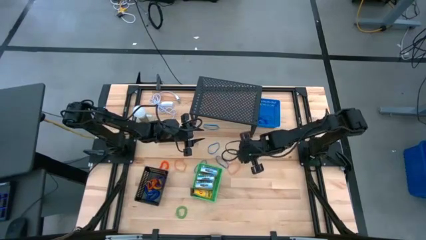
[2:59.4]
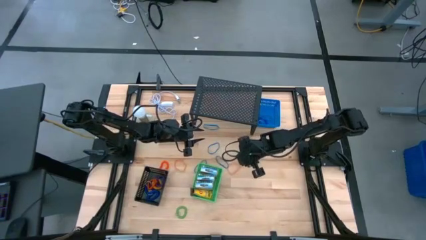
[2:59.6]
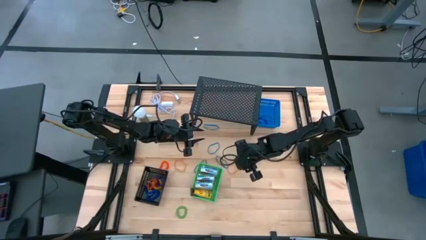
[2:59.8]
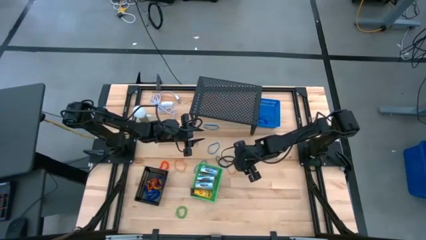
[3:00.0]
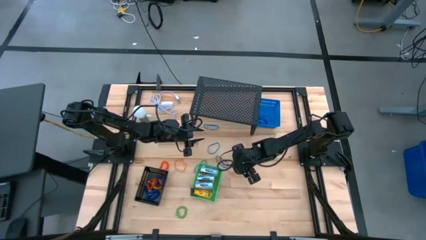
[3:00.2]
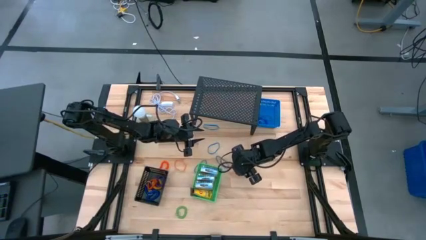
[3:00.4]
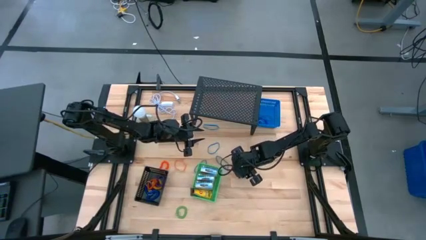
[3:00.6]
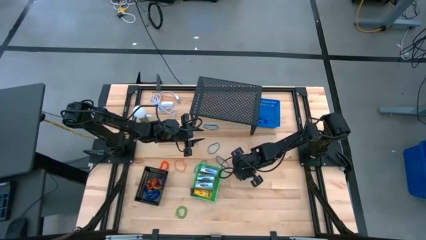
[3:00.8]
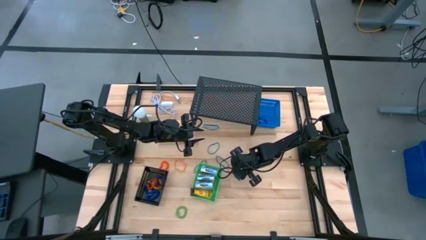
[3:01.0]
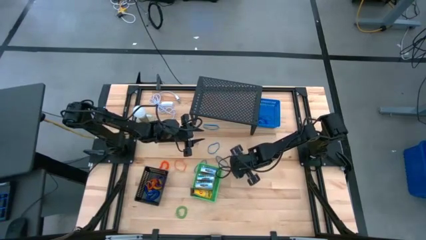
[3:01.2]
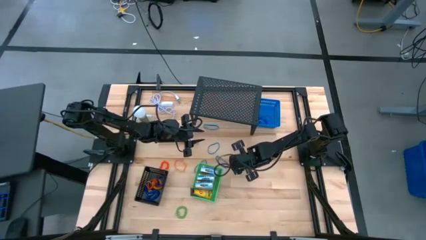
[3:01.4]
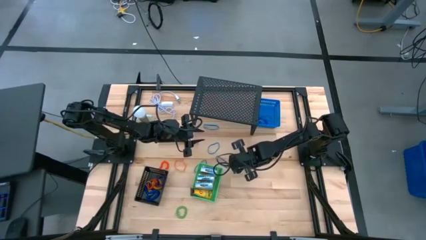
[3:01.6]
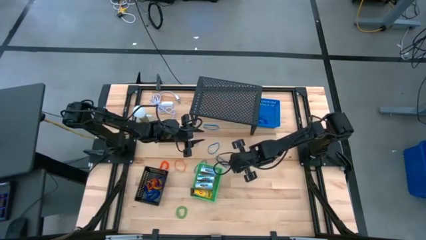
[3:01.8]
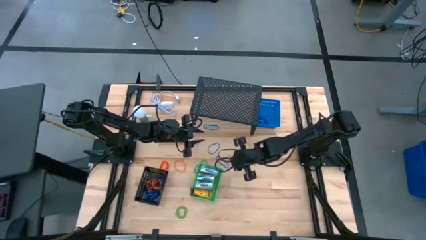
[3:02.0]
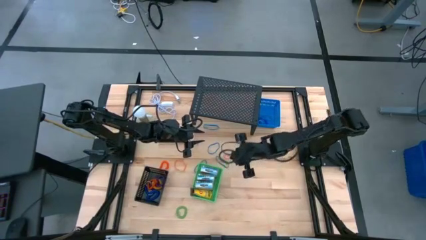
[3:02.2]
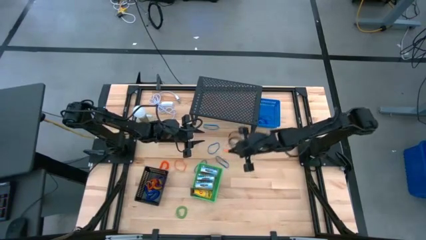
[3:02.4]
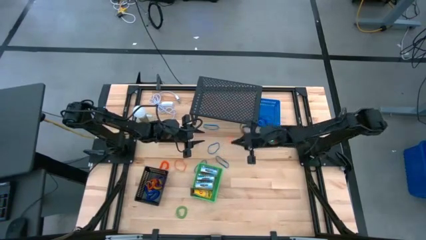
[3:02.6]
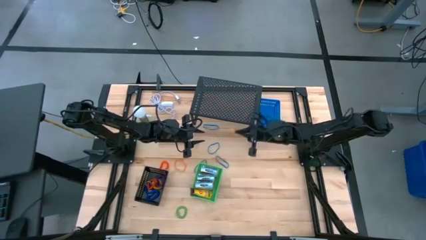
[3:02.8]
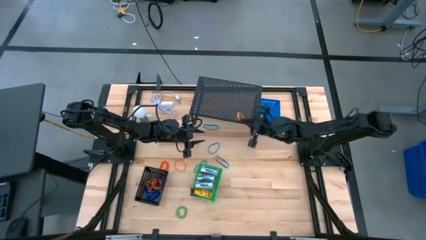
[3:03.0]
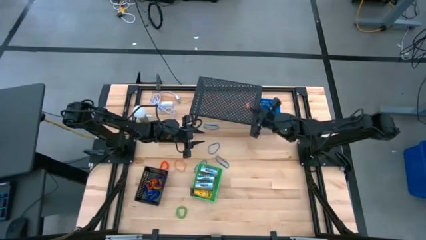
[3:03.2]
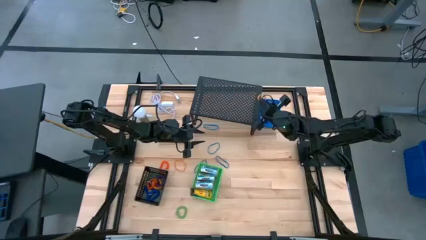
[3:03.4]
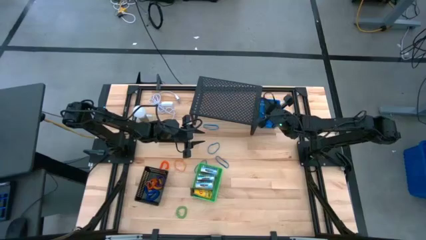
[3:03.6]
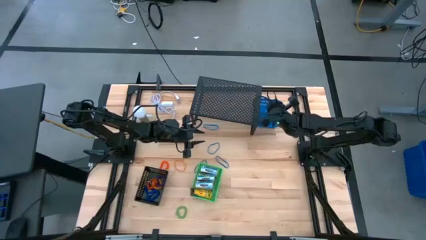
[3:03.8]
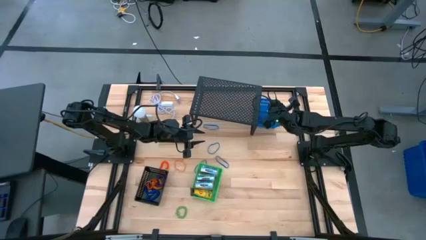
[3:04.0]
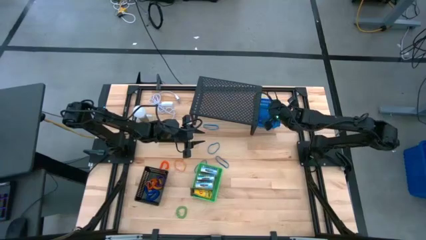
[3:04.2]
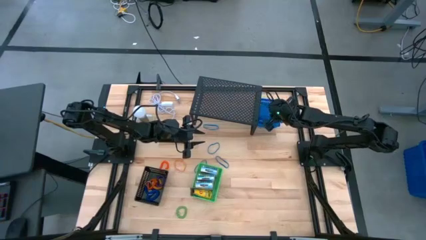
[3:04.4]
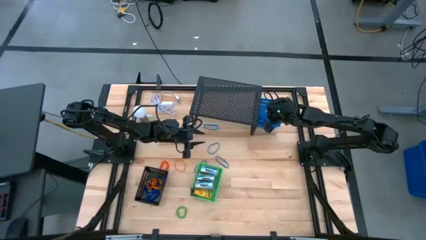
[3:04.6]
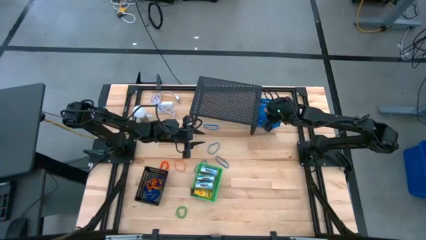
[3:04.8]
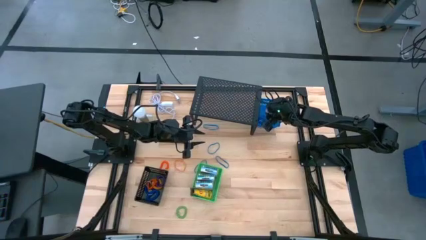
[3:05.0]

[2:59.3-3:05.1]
Task: Pick & Place Office Desk Supplies
Put the orange rubberband into the blue bin

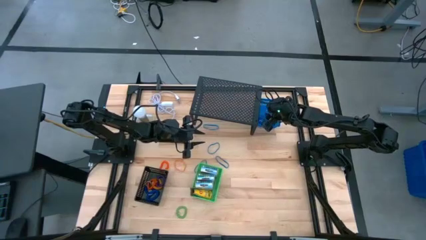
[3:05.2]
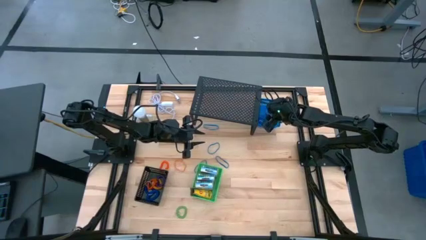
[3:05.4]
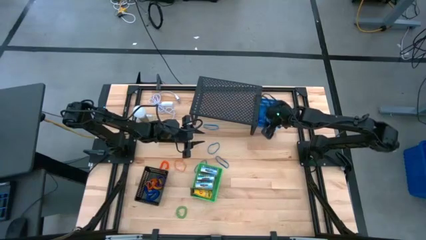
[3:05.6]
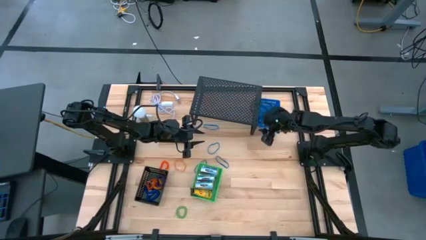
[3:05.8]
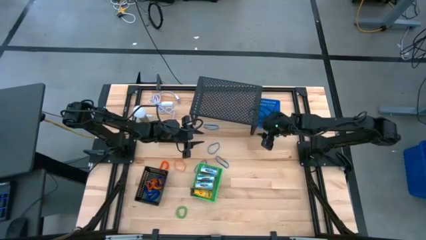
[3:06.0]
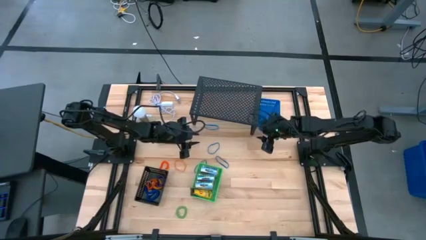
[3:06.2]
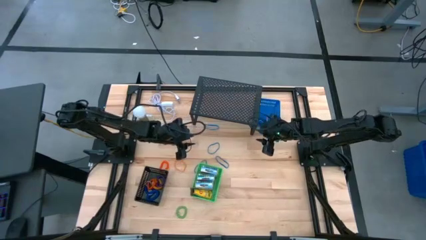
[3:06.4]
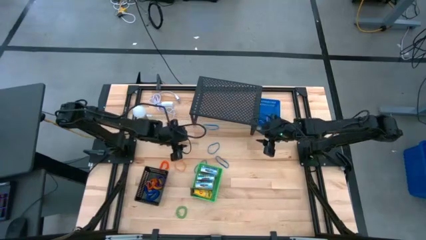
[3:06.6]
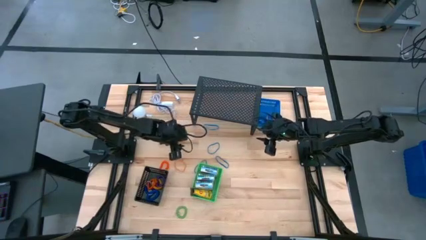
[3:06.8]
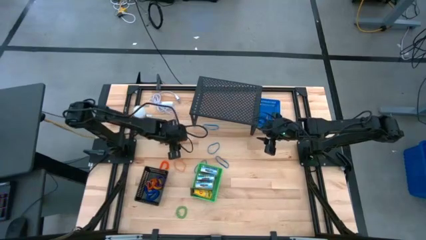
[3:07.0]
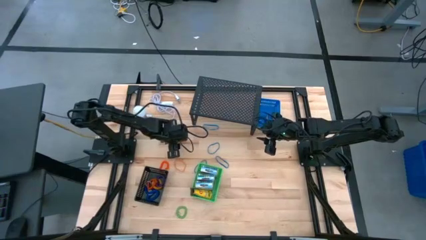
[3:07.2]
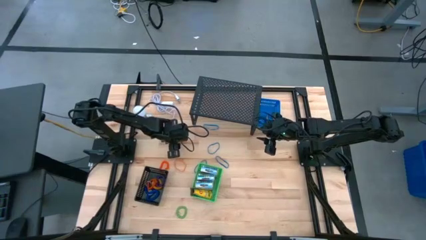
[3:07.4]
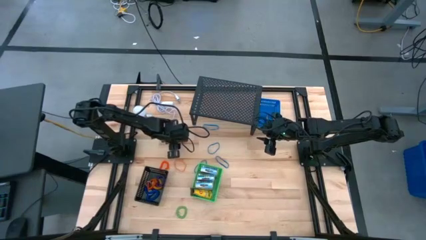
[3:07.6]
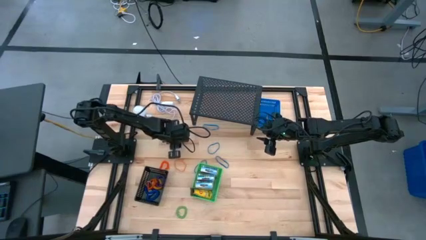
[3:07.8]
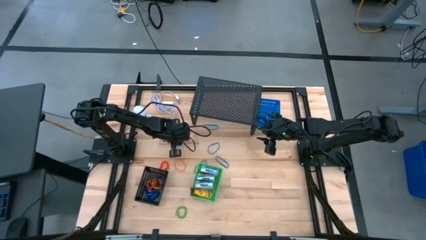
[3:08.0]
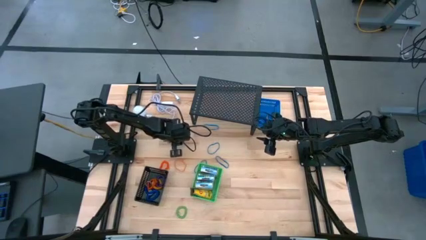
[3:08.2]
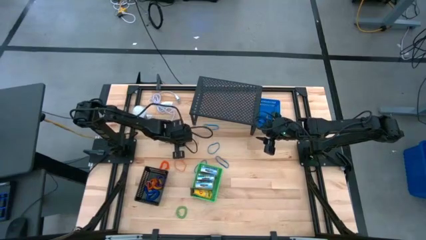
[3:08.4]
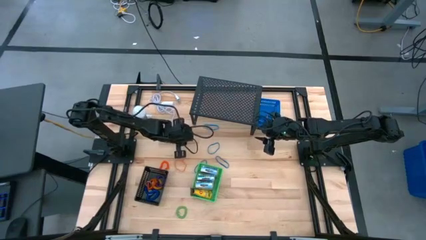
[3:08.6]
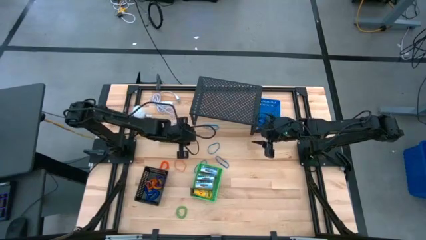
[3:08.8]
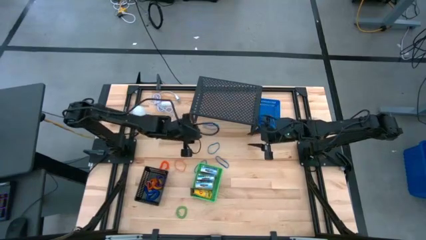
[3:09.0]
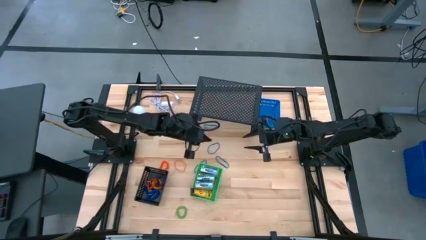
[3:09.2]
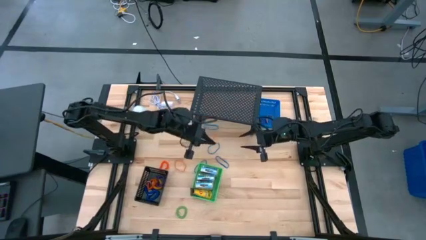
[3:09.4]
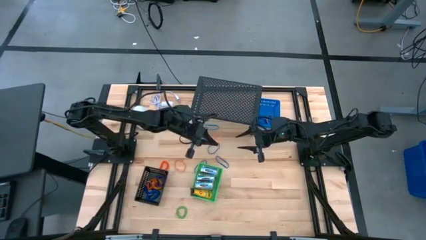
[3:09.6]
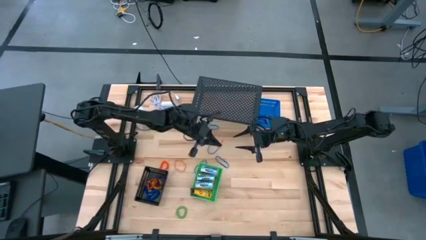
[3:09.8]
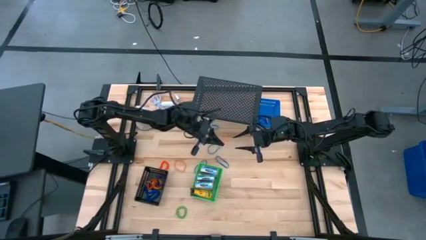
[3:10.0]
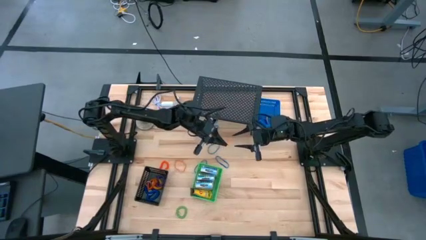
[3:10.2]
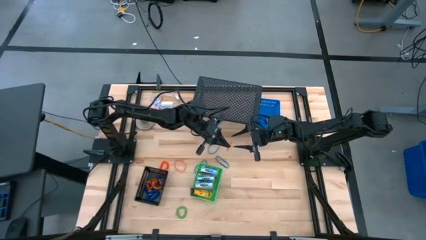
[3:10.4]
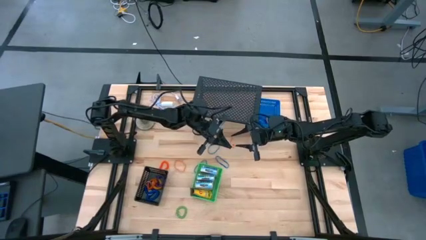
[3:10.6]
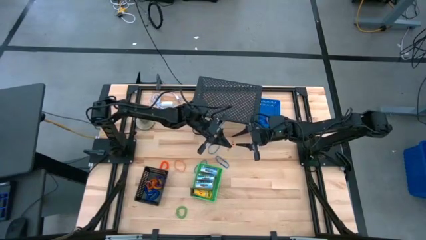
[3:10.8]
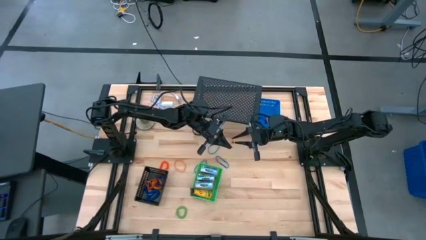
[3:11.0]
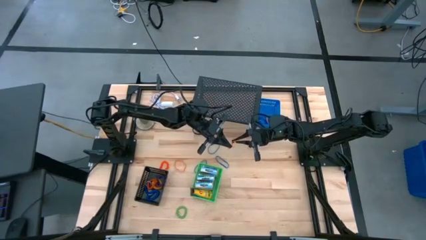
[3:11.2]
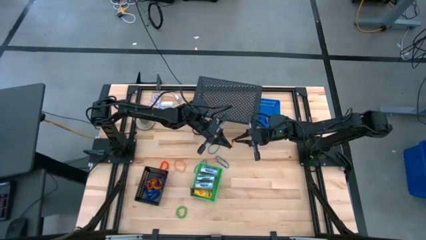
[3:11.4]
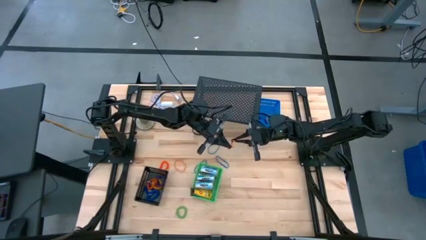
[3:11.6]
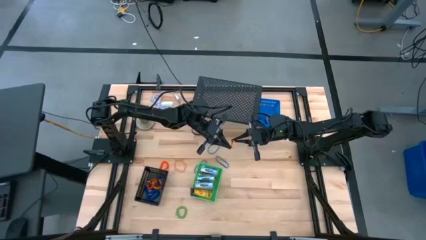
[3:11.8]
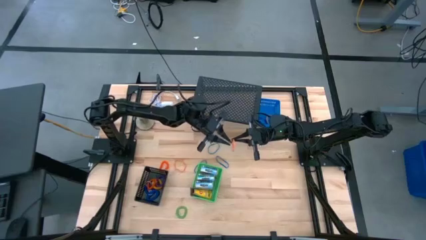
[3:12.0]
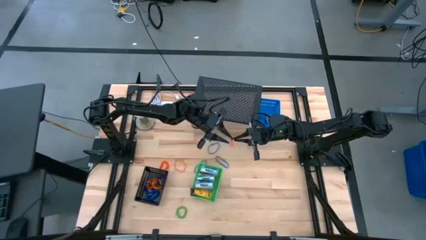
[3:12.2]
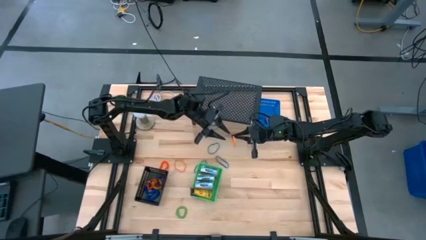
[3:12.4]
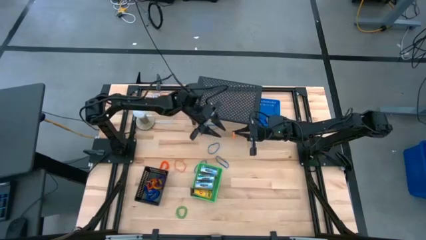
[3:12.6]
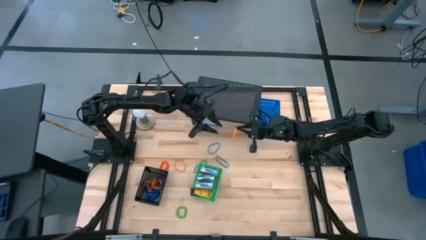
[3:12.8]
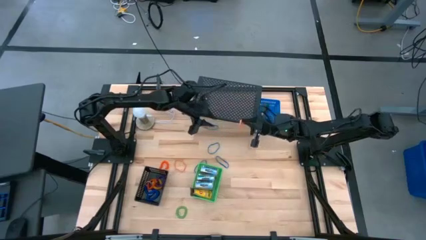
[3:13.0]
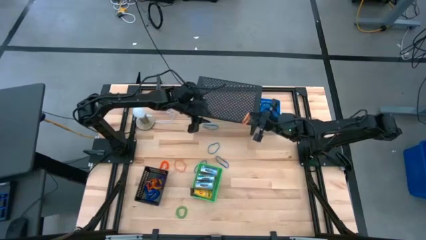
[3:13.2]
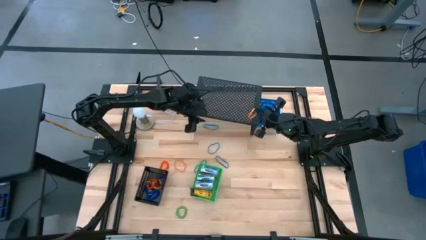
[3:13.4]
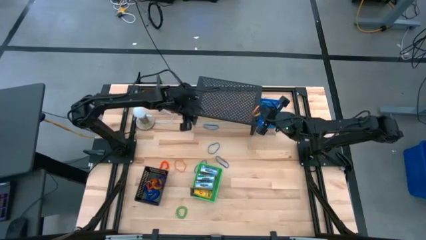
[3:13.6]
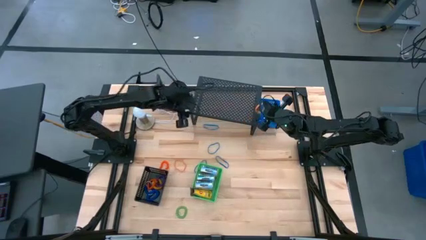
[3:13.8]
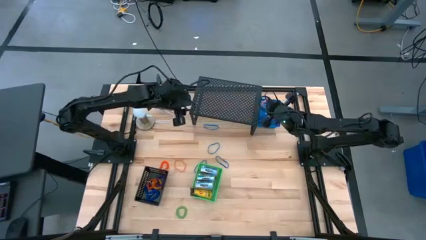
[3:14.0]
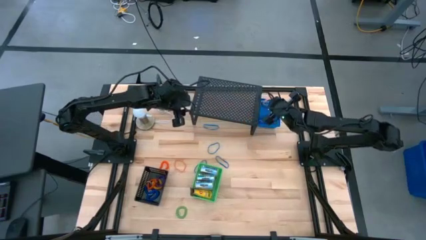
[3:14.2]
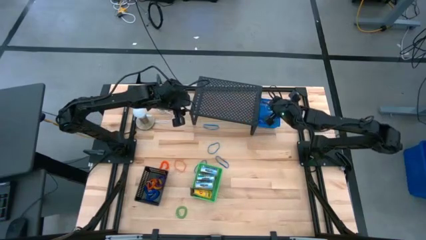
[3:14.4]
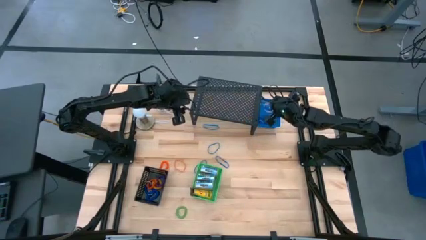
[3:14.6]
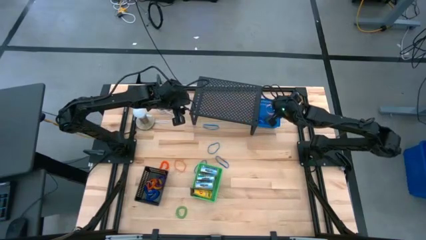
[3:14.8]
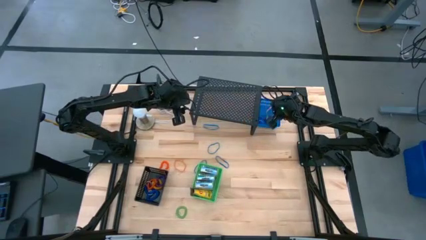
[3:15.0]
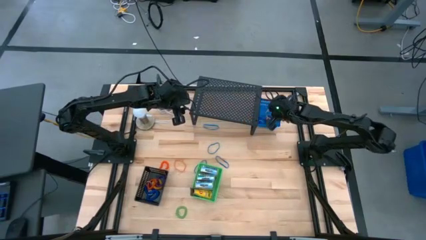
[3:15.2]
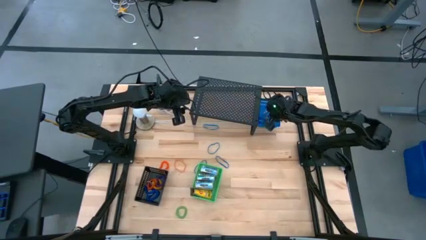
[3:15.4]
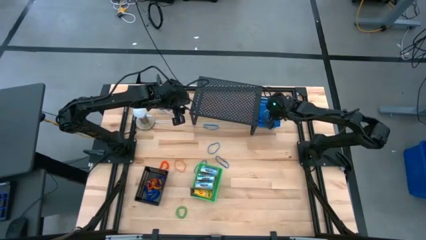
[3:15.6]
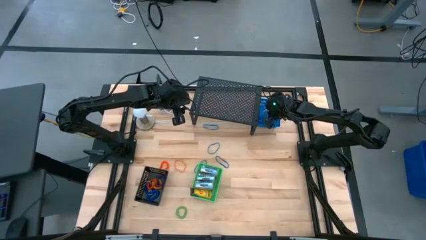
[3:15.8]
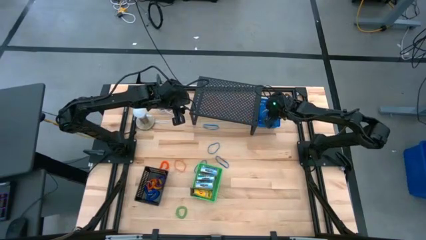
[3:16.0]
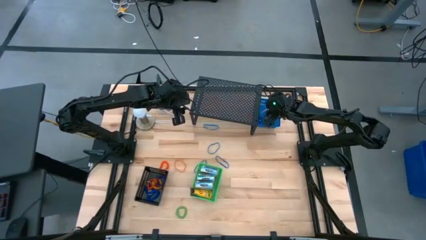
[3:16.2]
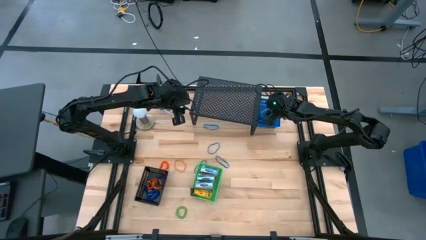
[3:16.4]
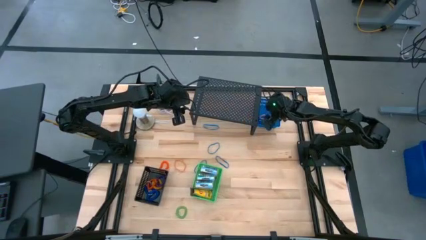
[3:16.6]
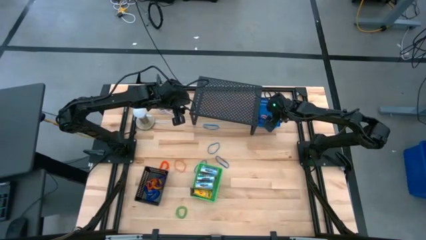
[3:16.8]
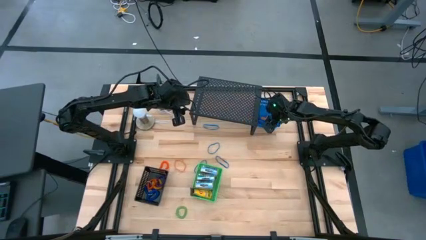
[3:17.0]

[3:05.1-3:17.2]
Put the orange rubberband into the blue bin
